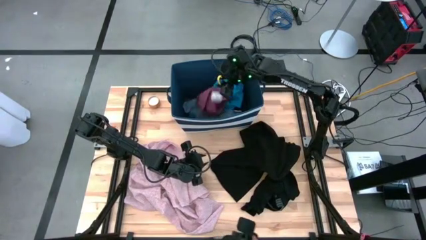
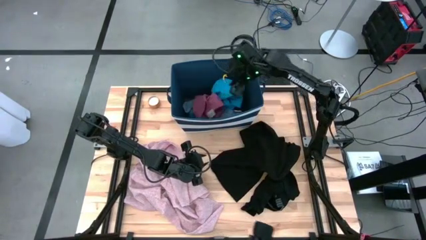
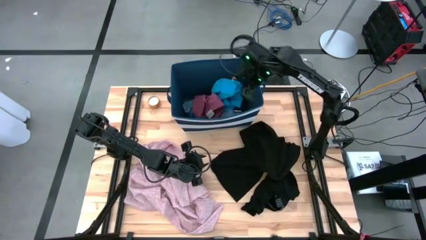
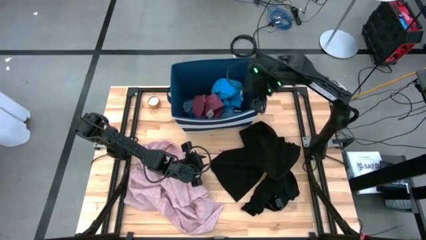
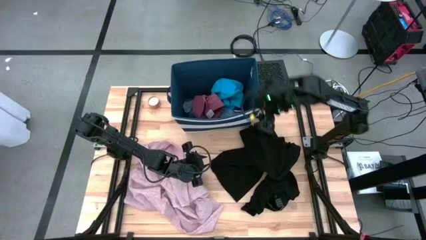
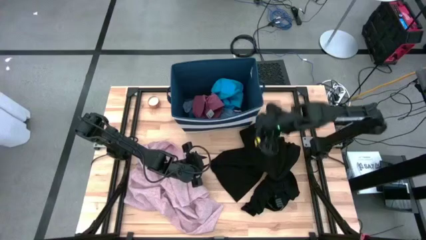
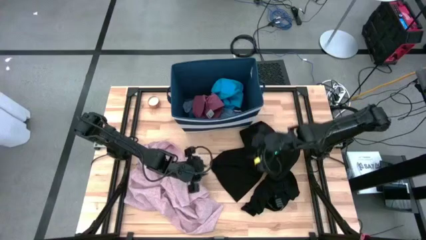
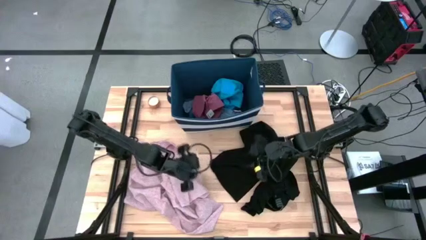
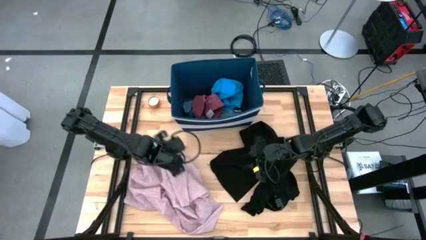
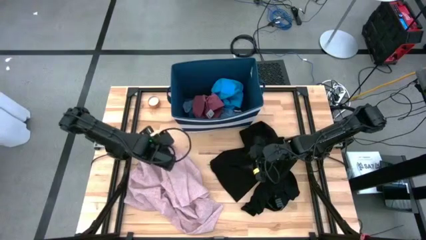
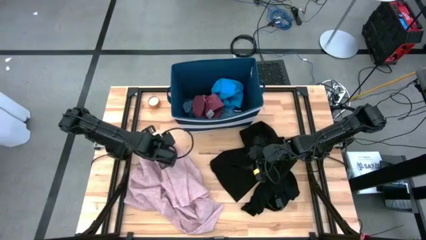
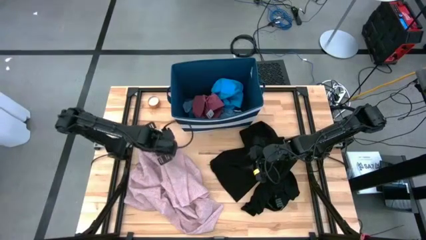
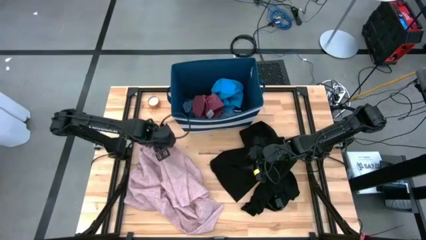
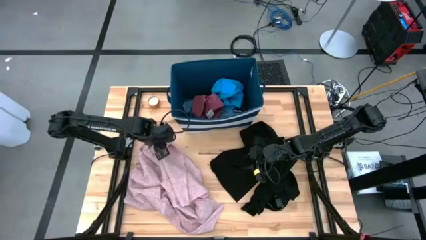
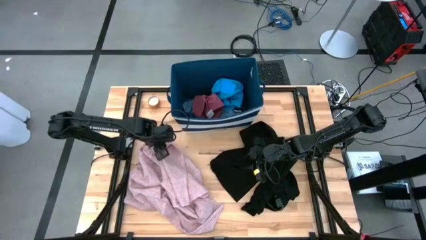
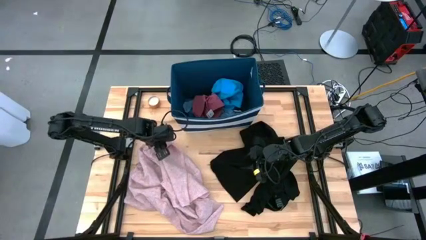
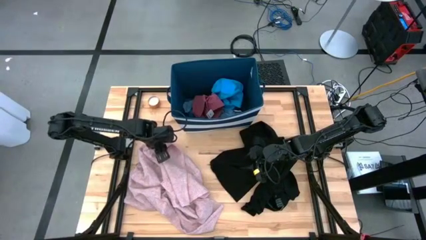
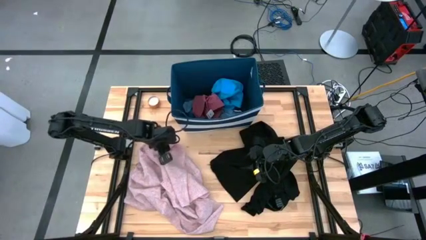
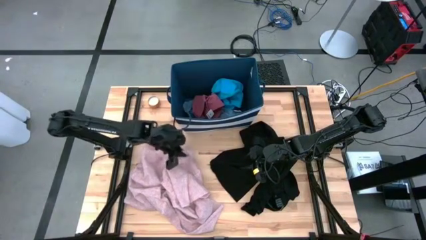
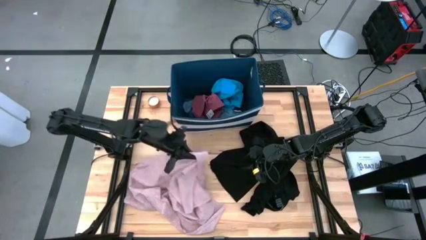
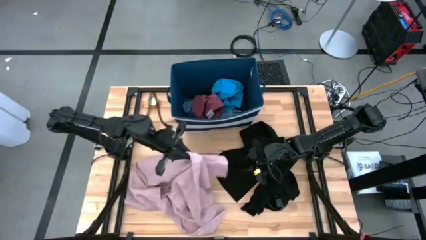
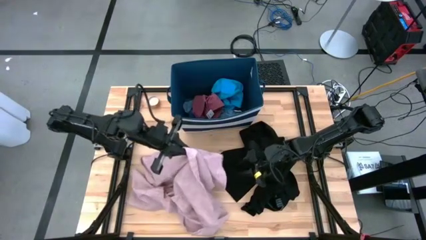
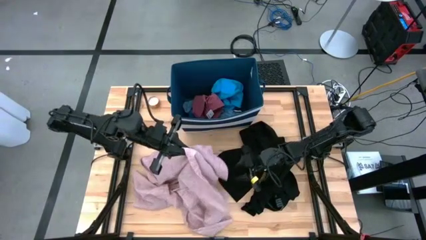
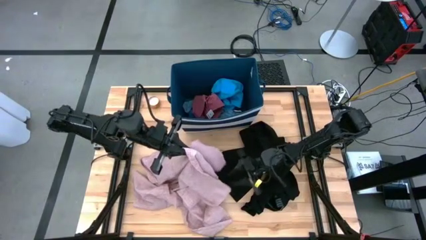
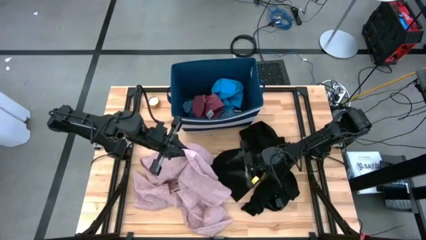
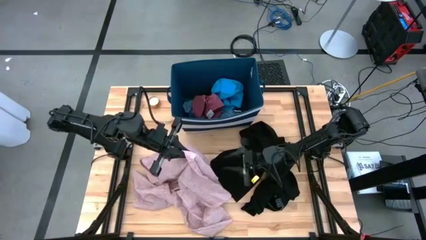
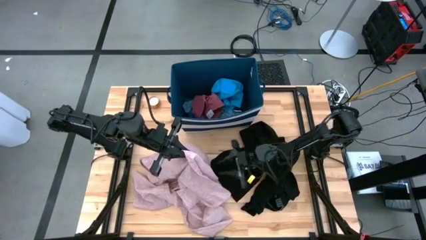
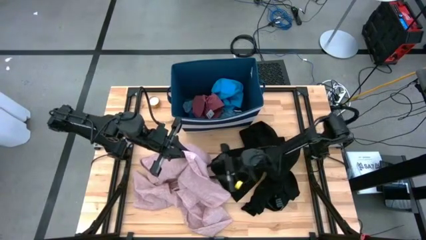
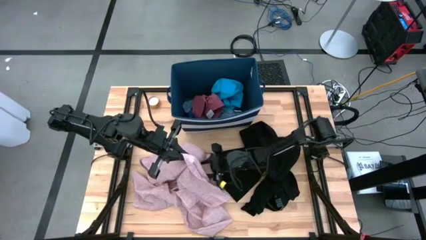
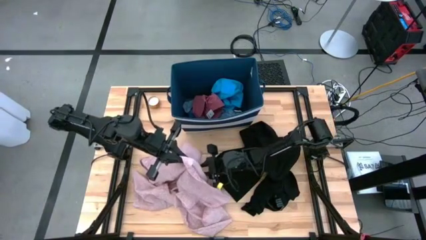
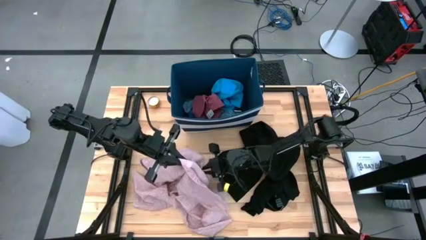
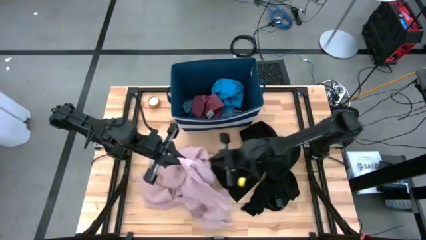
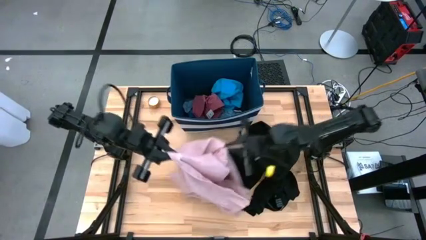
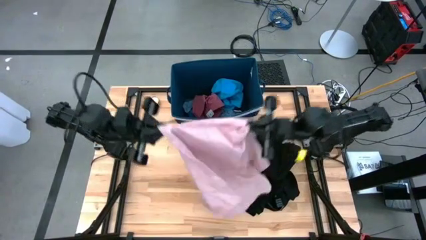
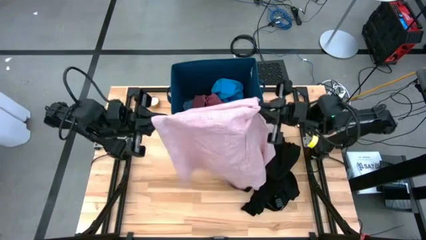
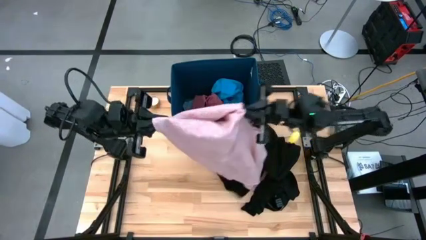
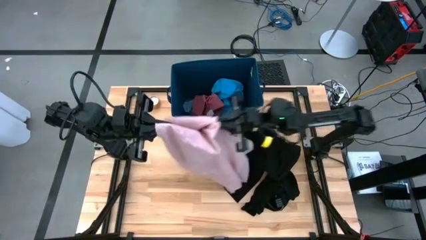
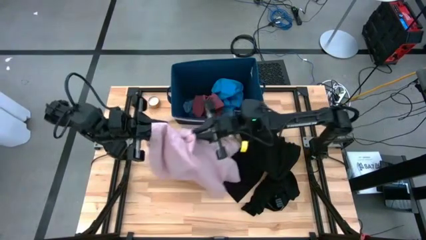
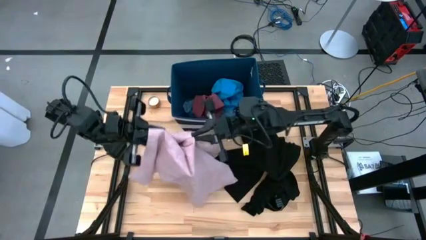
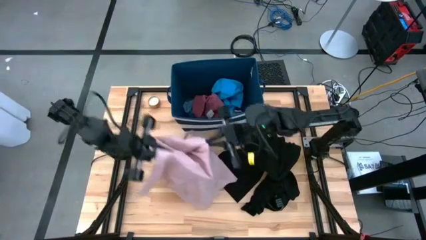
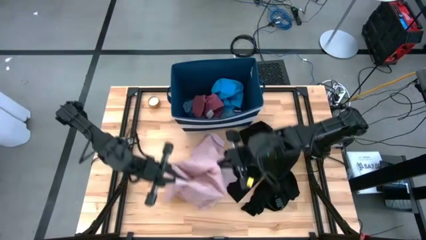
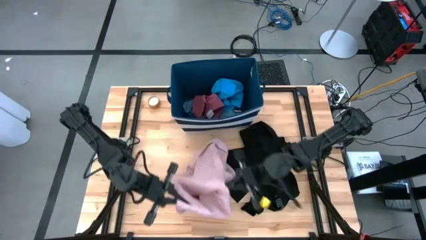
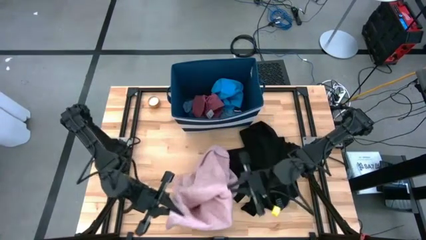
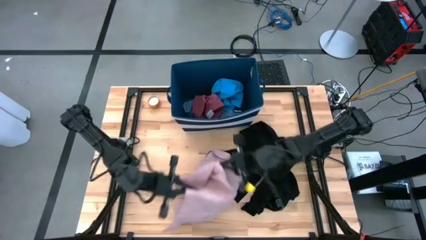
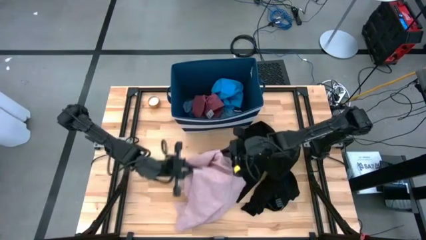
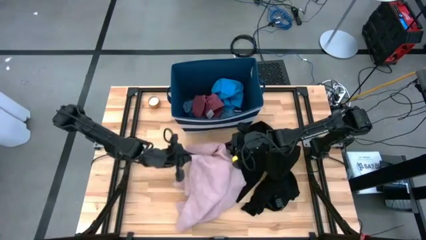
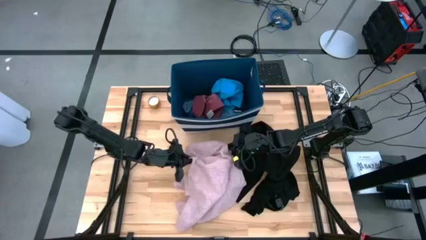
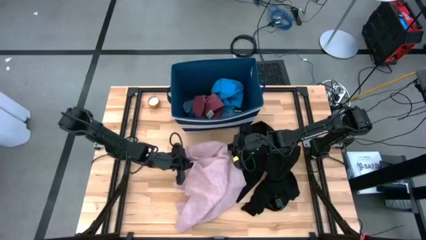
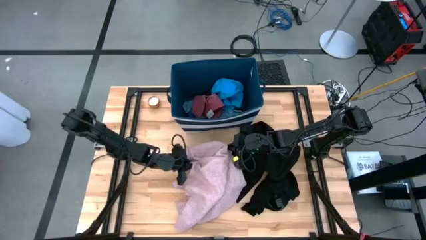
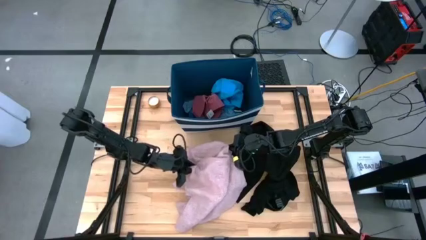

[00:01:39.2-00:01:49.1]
Task: Sort clothes
Put the pink polo shirt into the blue laundry bin

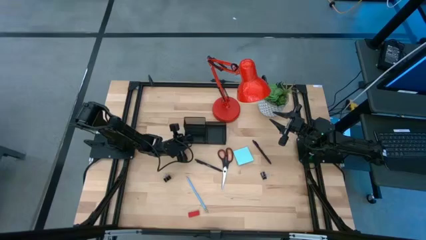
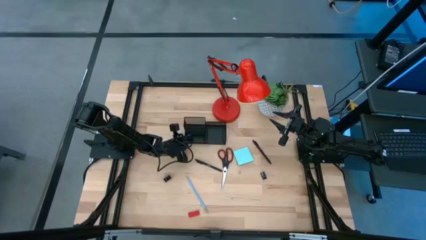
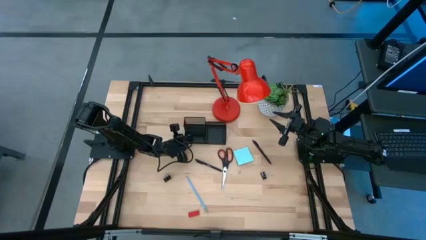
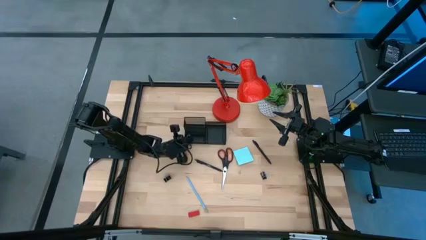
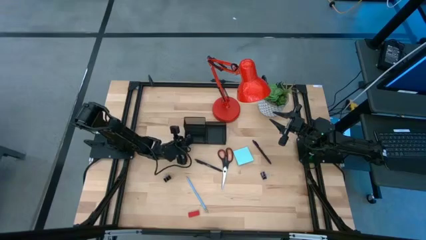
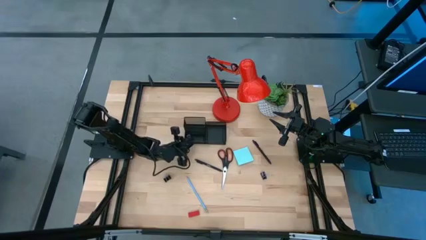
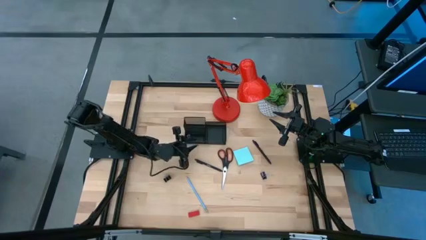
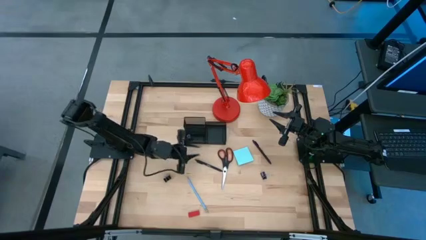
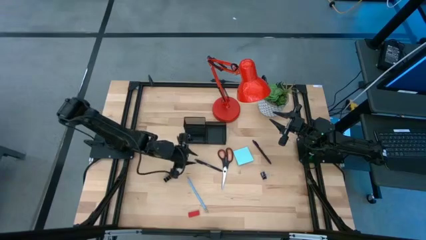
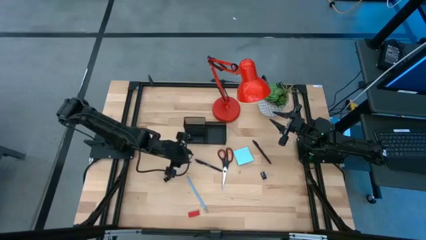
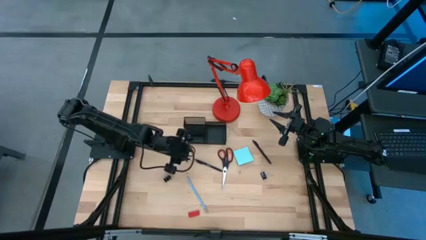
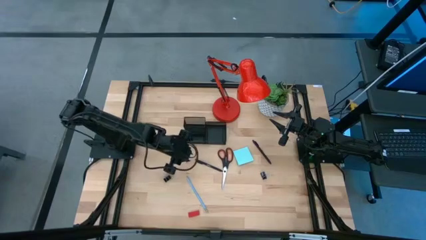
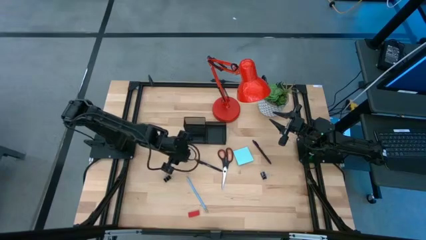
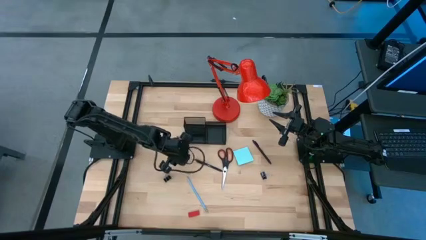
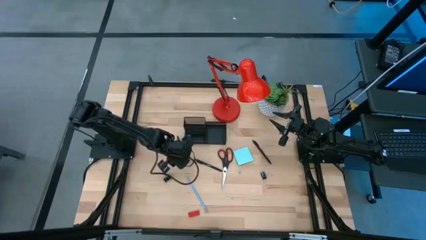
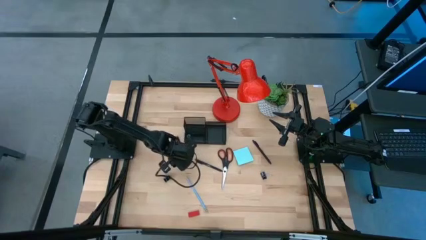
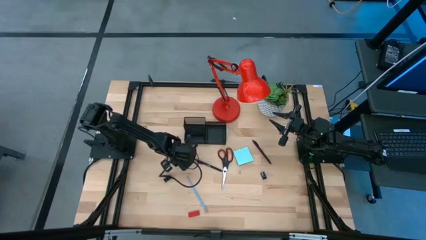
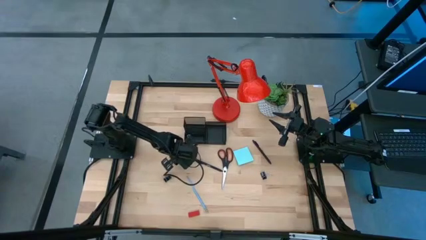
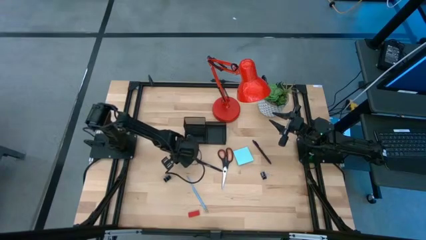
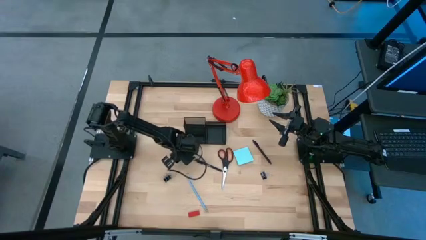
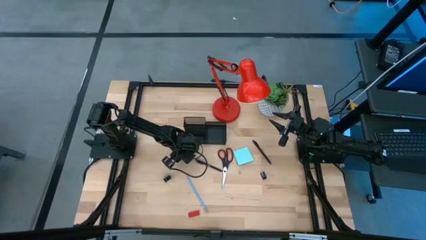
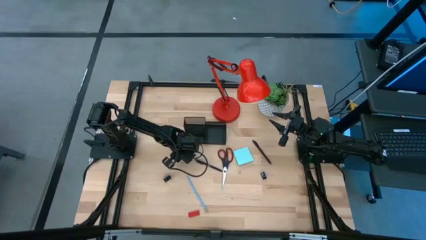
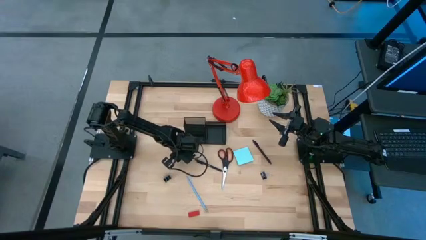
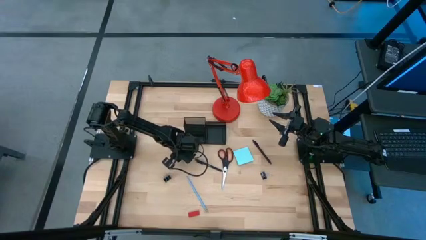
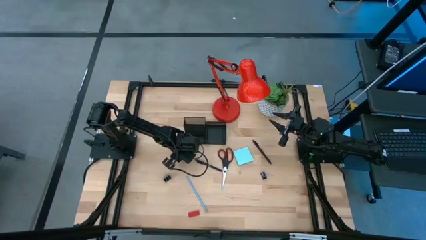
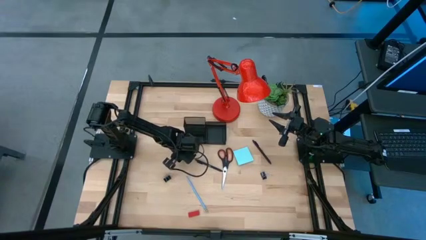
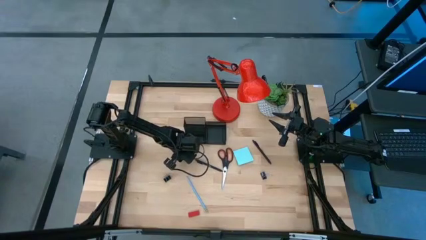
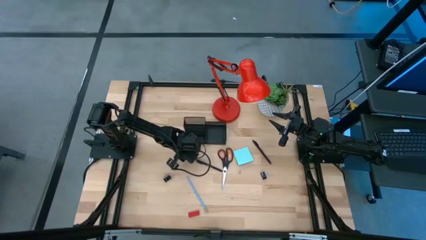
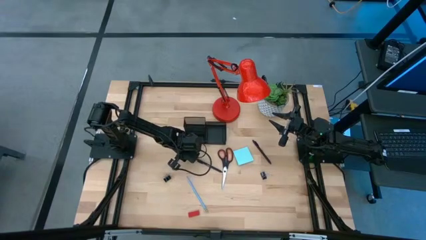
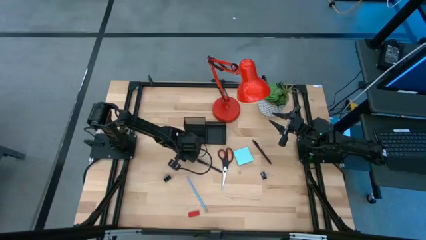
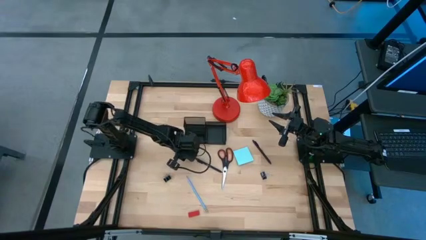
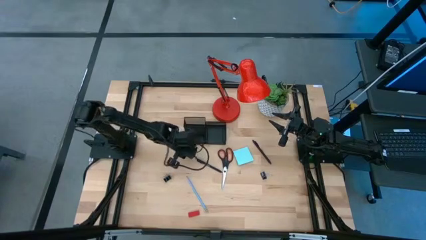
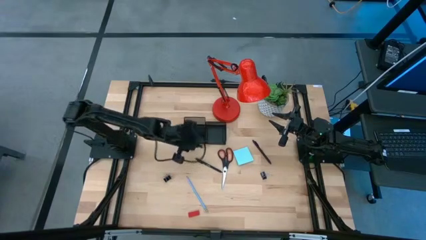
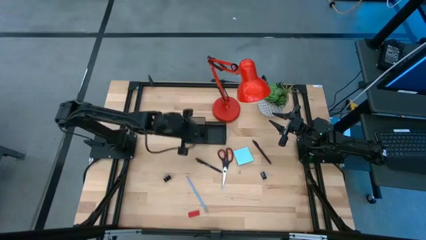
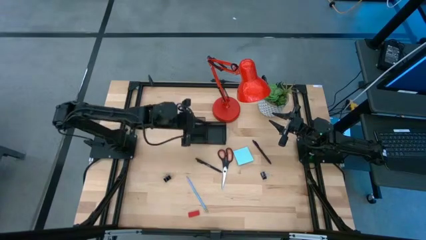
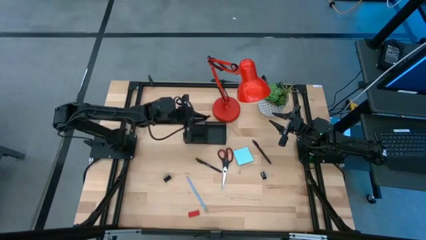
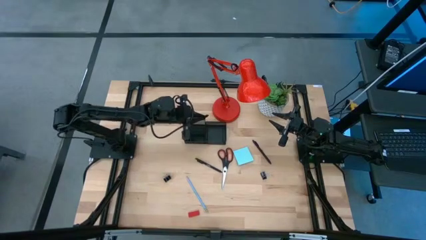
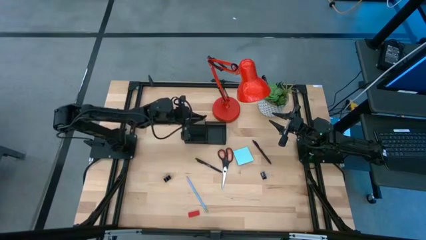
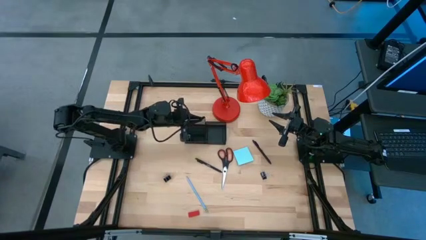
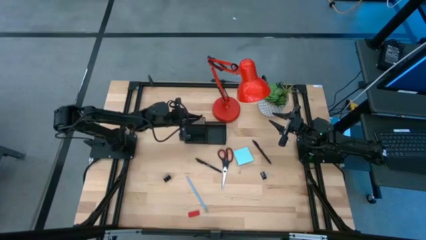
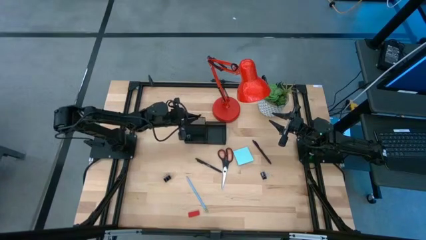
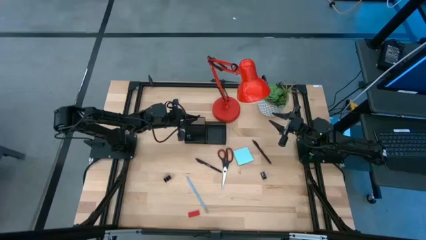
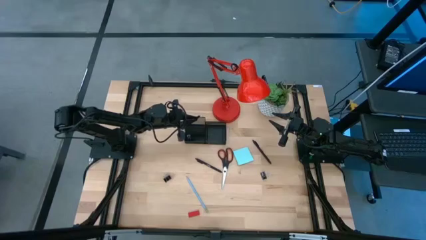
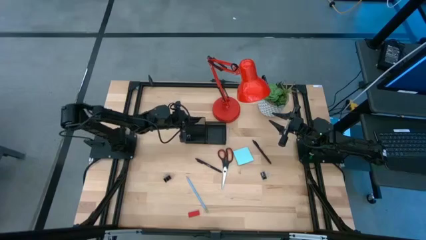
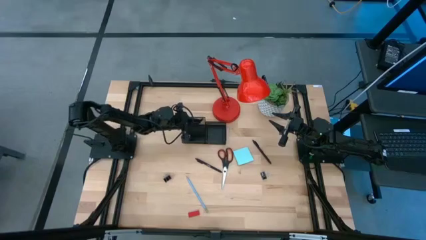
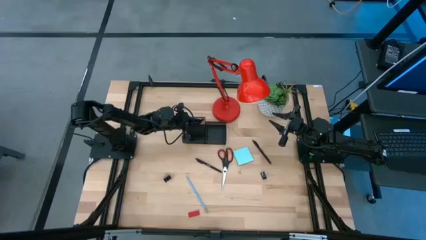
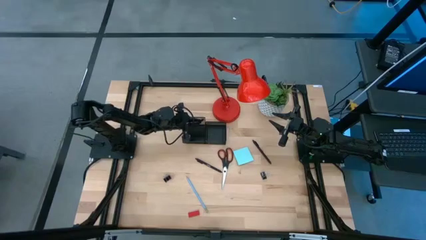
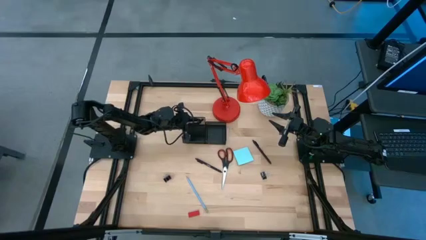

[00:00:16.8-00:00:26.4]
Task: Pick and place office supplies into organizer
Put the left black pen into the black desk organizer
